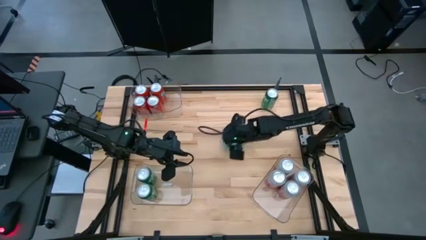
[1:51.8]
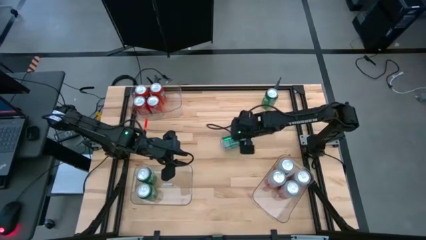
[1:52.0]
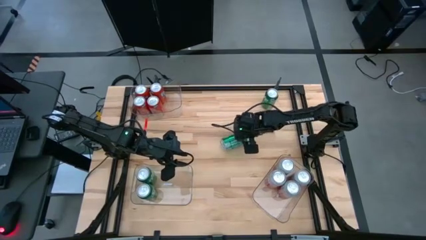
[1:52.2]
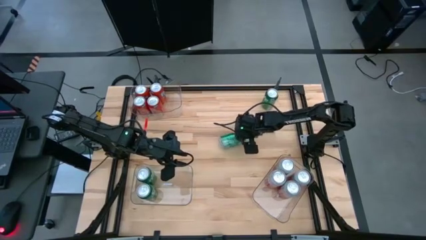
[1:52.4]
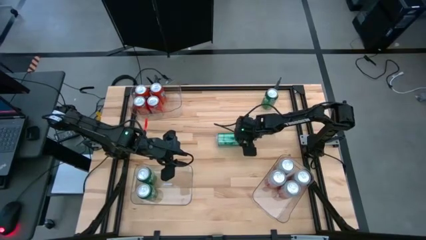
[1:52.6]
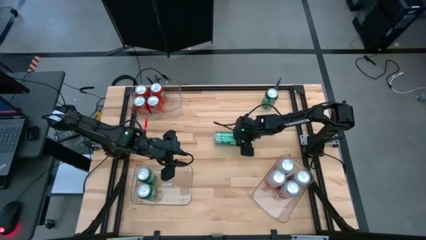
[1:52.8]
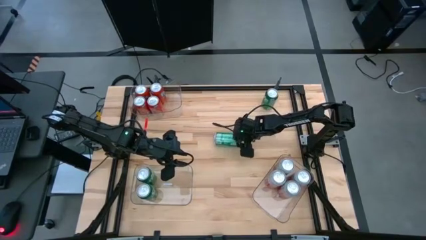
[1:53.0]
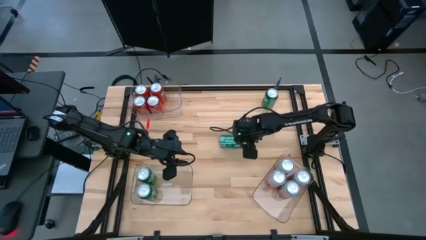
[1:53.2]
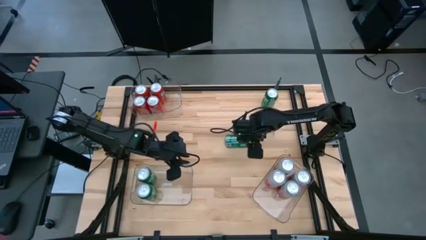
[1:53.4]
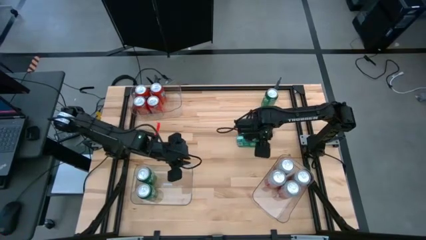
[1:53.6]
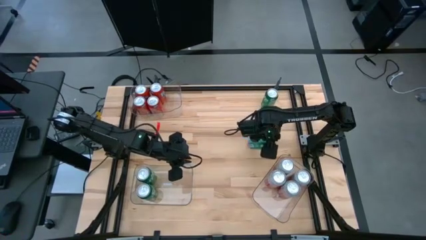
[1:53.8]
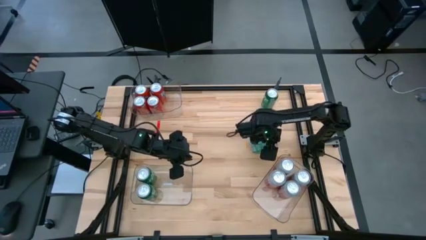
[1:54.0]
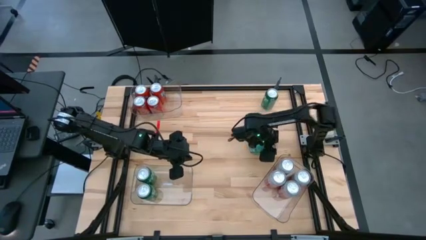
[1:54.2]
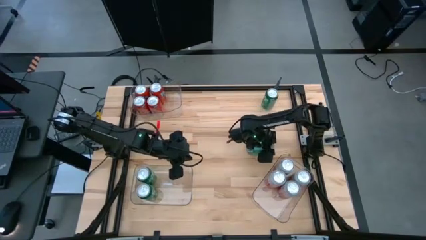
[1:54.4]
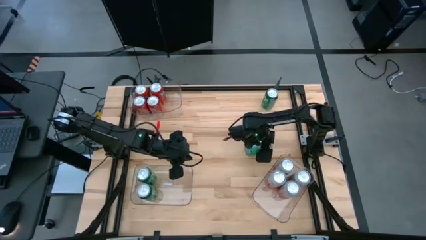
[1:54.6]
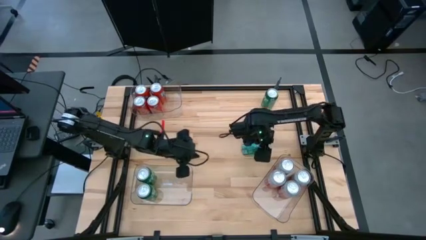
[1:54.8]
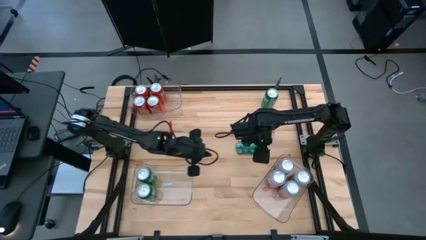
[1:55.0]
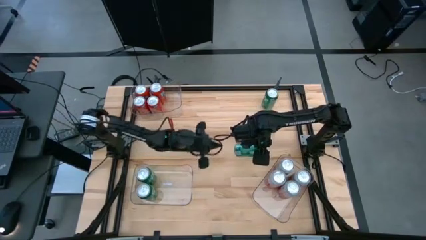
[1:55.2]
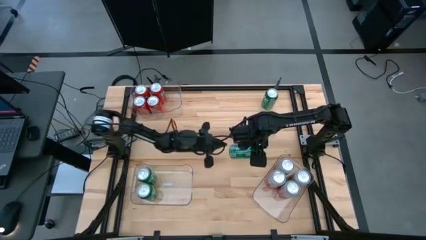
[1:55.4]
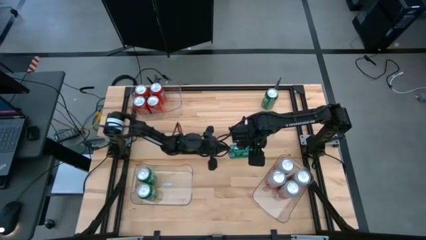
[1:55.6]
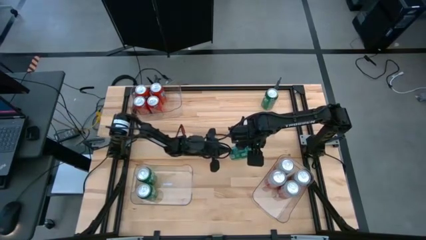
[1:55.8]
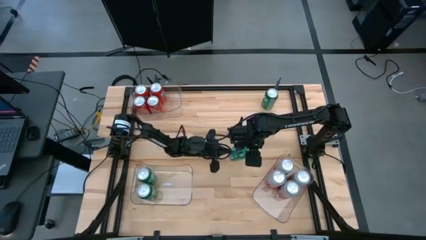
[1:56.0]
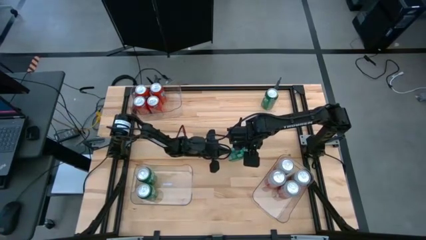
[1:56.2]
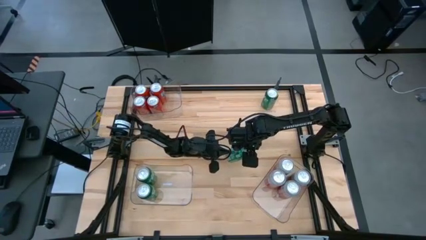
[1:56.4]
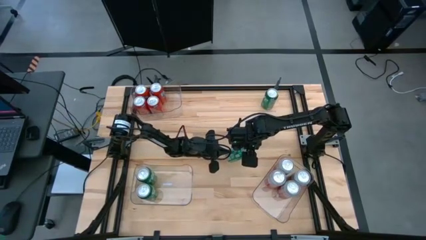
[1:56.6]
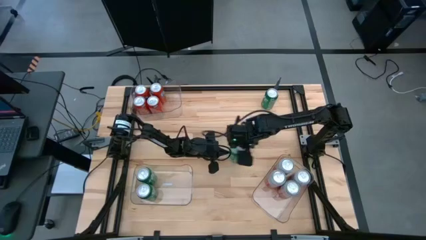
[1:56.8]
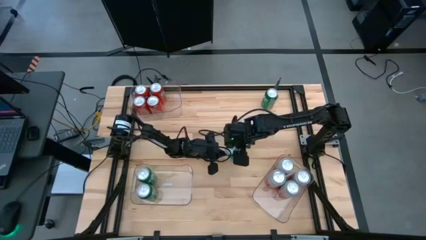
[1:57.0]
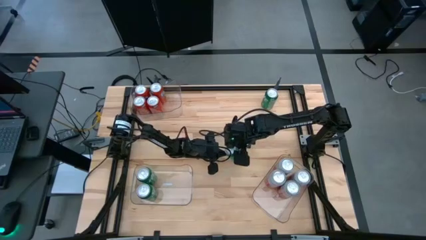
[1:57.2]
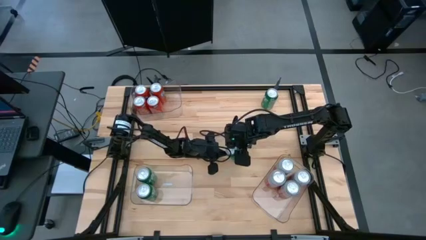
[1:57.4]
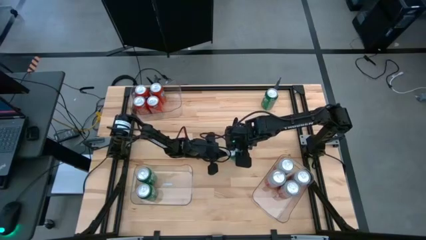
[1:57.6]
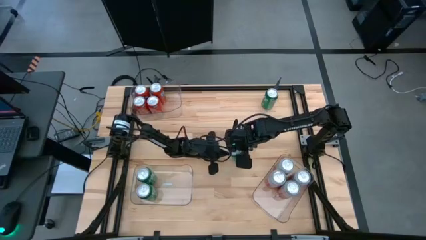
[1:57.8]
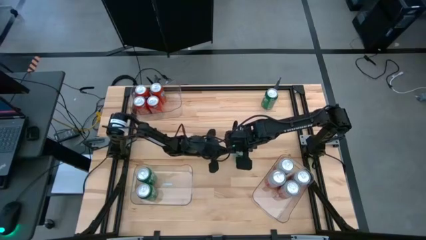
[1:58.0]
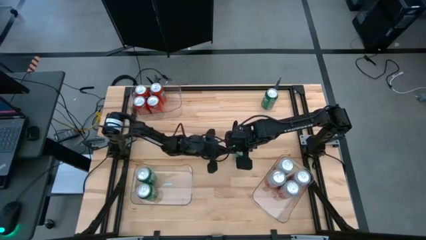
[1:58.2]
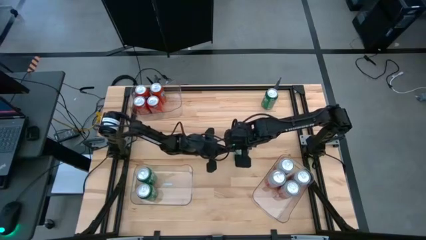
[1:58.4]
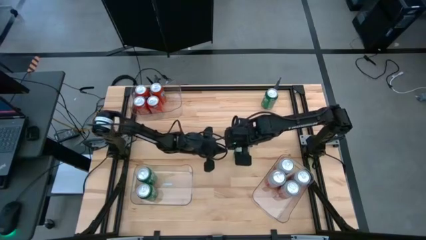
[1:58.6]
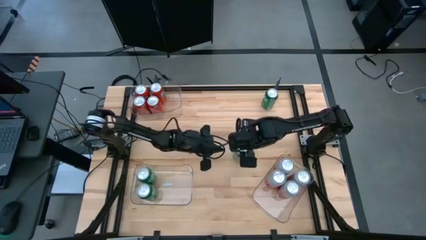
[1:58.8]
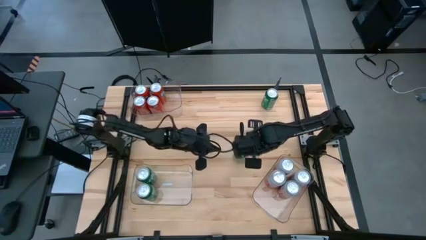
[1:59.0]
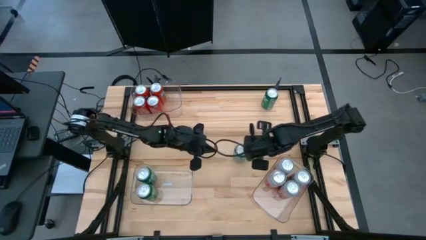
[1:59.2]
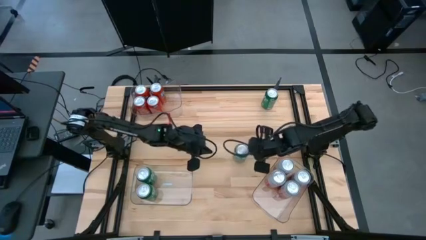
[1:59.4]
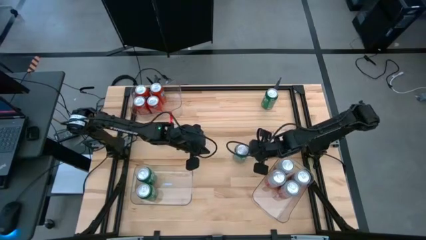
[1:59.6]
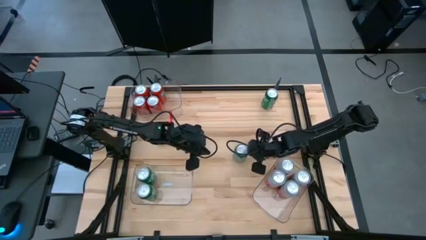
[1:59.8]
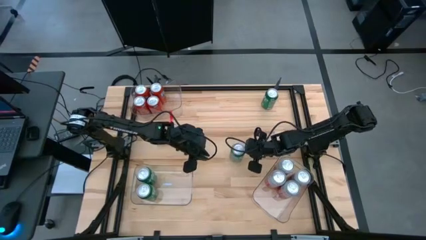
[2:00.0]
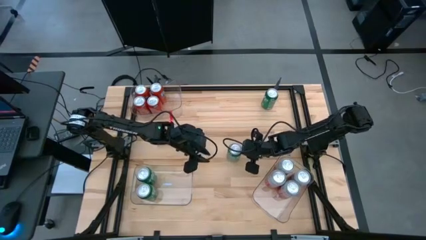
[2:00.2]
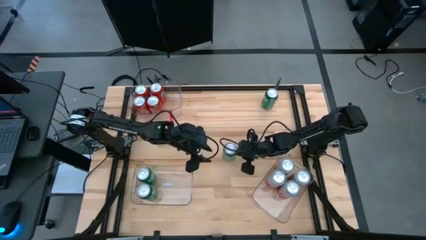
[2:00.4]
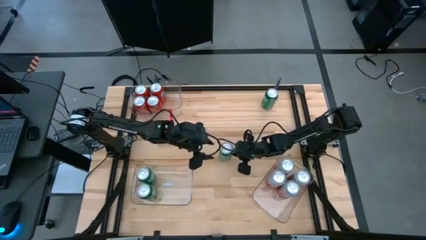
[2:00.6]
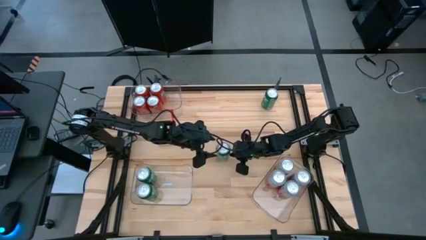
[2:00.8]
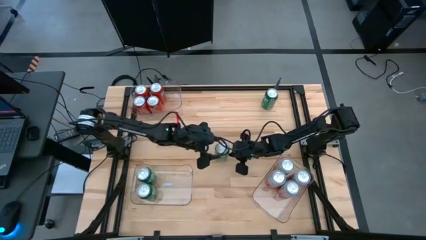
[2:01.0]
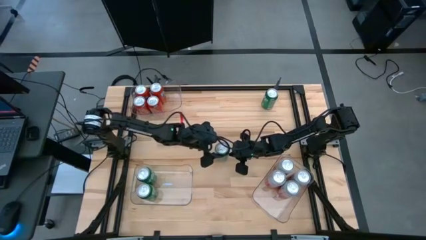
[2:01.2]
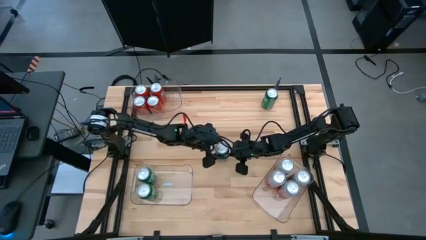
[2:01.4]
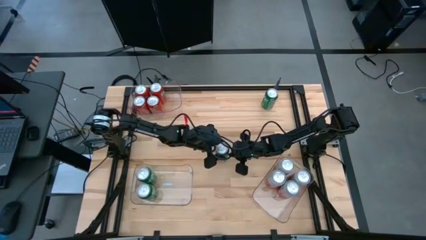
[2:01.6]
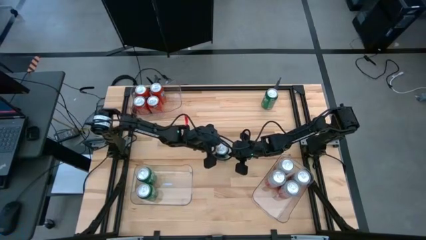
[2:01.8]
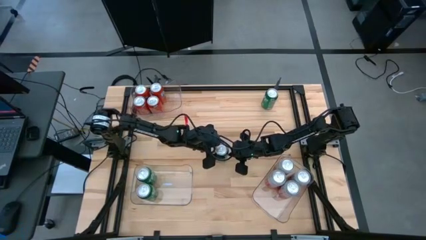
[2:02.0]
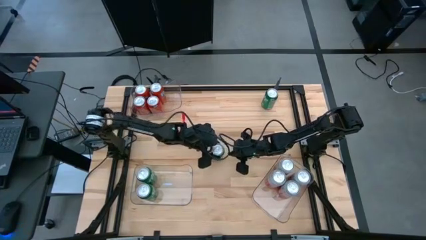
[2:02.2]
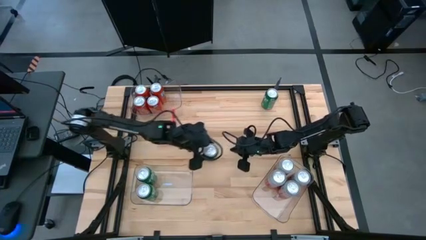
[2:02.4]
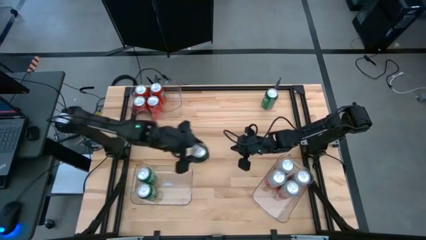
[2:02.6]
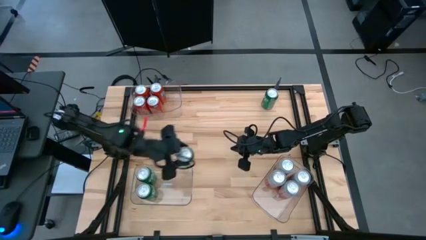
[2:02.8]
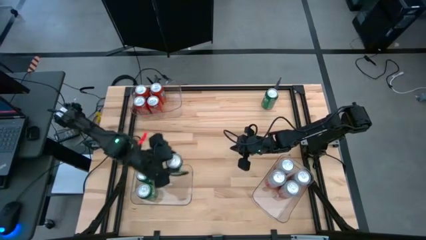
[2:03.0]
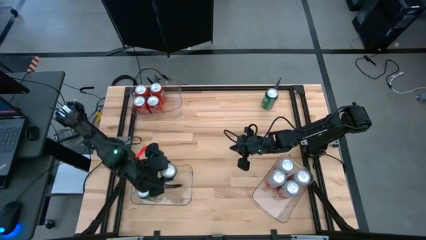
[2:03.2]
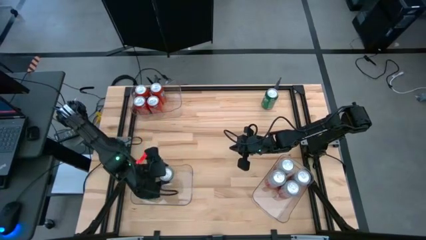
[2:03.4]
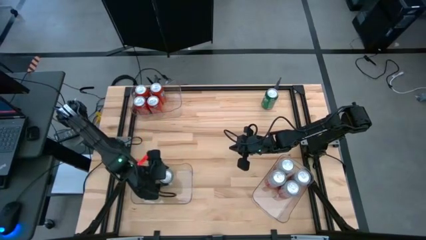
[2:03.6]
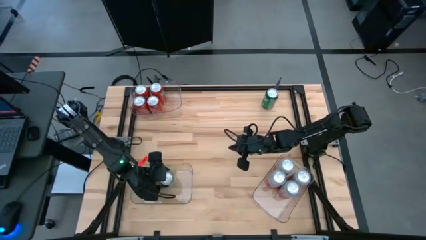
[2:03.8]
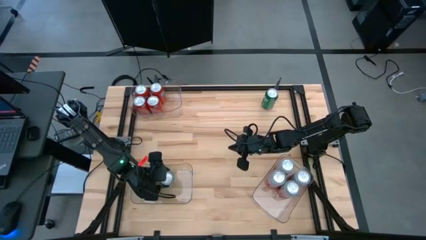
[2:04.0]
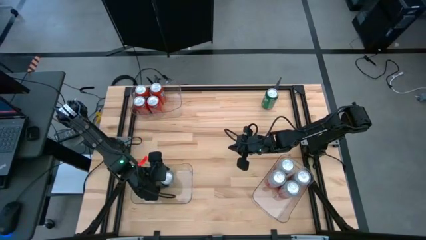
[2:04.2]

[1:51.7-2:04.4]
Task: Sort soda cans
Put the green soda can into the bottom right transparent bin
